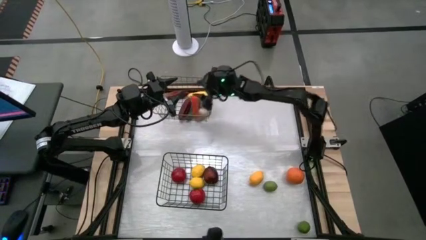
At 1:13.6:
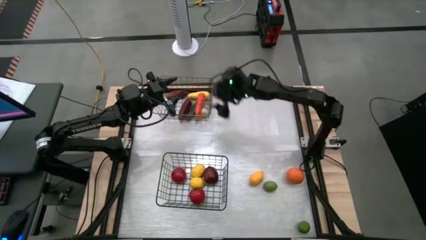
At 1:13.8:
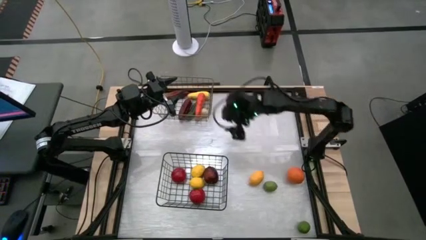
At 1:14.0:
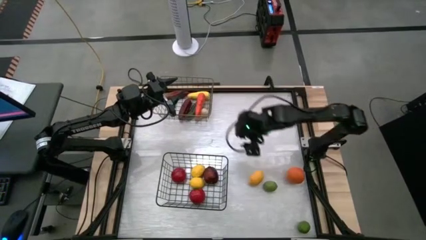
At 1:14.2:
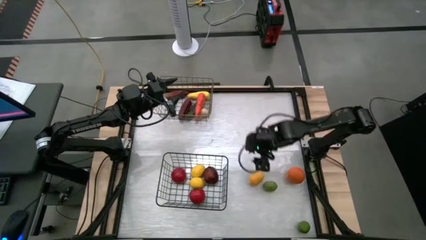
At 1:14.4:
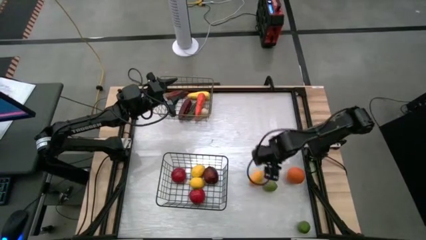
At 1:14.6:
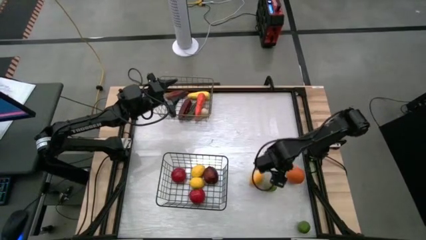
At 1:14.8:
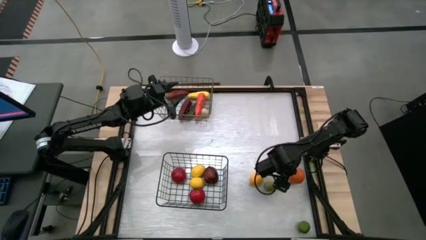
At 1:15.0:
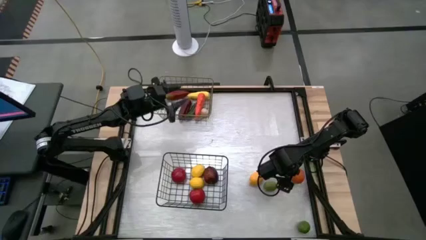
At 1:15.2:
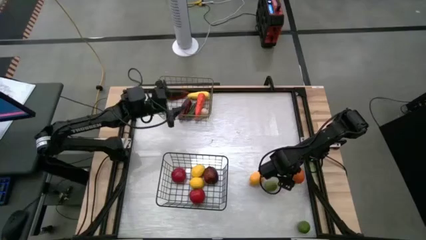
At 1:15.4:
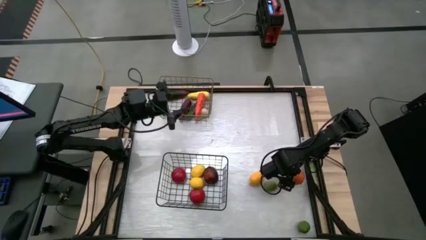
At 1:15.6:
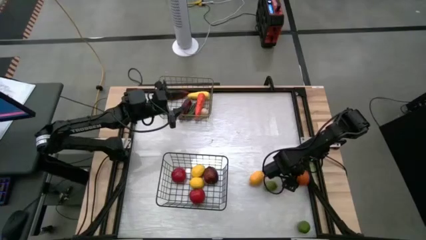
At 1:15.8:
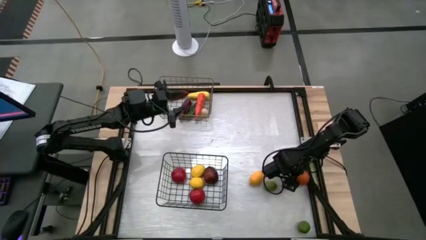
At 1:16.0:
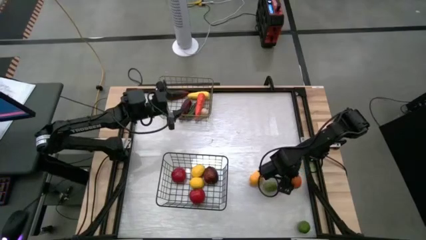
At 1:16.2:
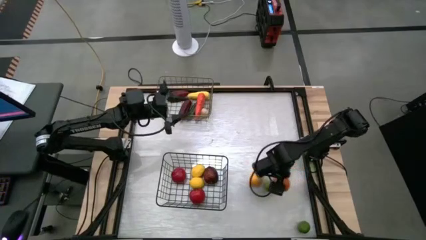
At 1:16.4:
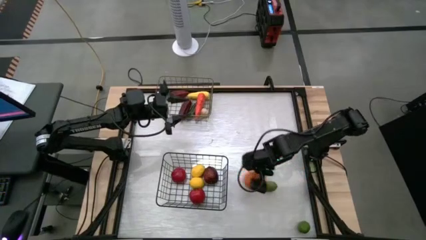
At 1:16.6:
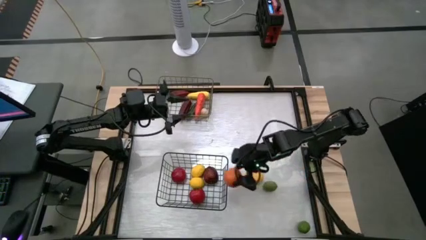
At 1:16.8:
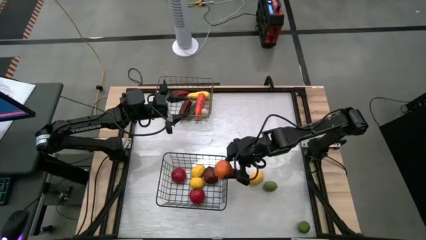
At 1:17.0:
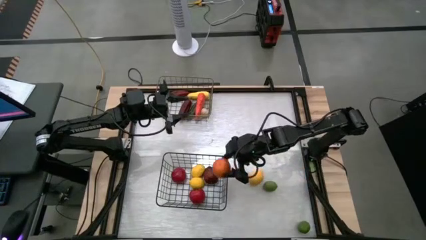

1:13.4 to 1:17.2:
Task: Sort produce into baskets
Put the light red orange into the bottom wire basket

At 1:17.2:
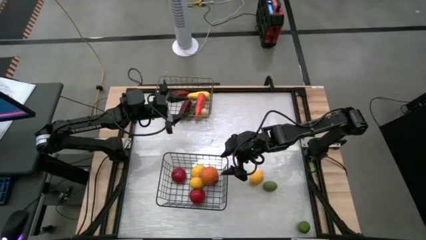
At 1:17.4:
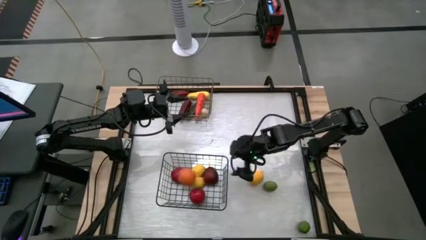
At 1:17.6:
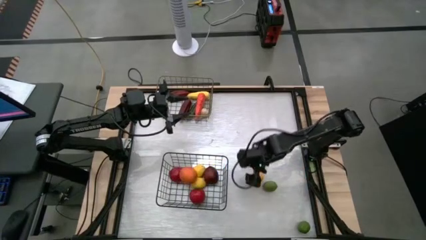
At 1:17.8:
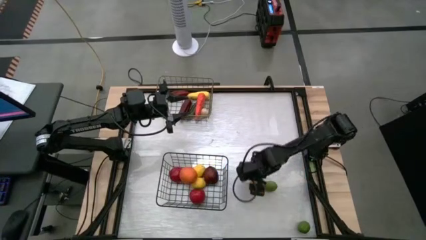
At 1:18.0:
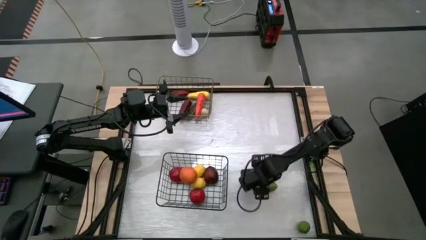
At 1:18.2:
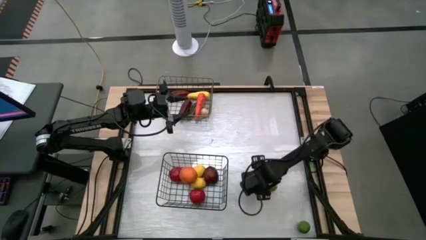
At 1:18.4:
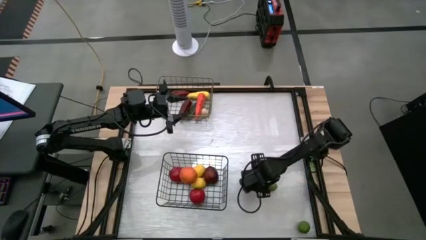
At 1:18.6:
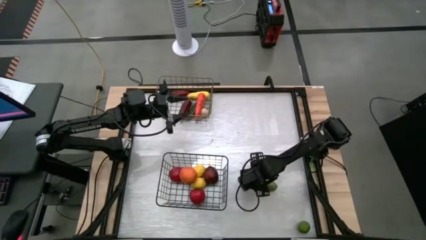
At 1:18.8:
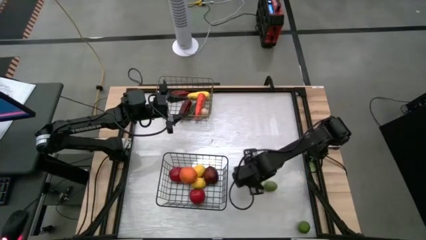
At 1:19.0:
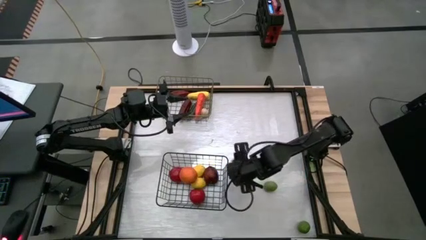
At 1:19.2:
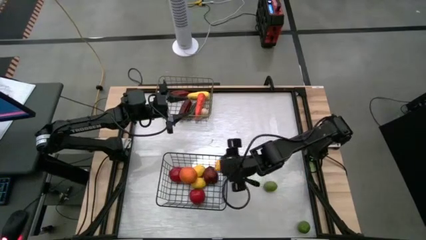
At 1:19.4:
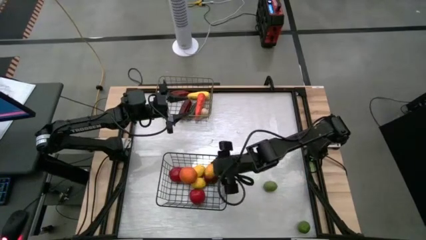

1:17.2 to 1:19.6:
Put the yellow lime into the bottom wire basket

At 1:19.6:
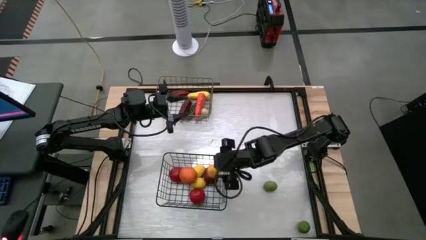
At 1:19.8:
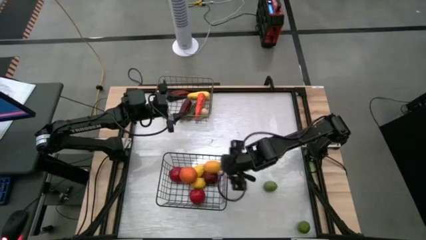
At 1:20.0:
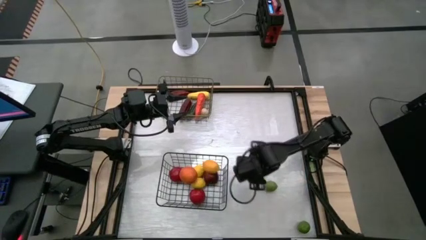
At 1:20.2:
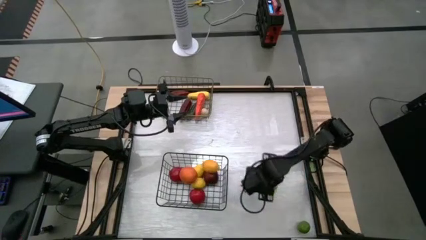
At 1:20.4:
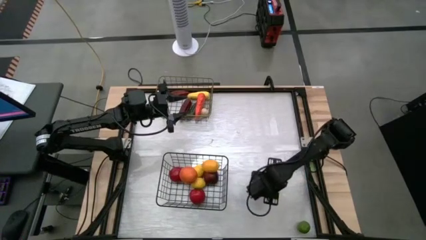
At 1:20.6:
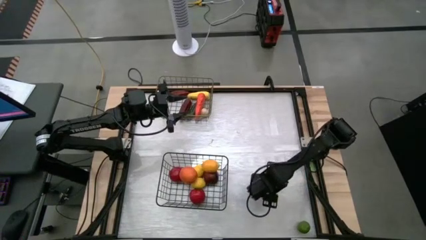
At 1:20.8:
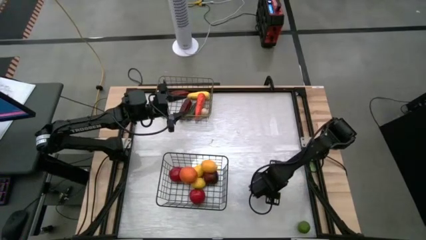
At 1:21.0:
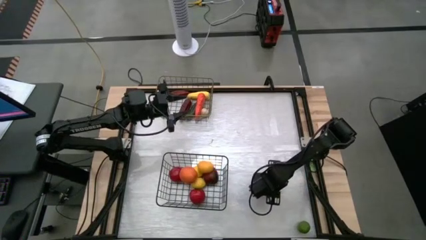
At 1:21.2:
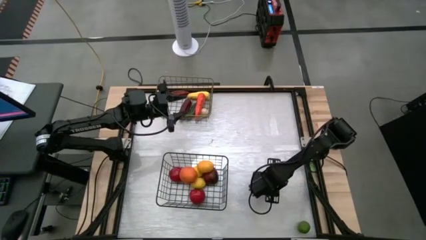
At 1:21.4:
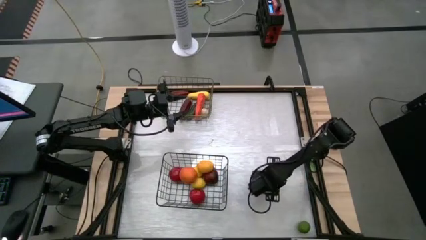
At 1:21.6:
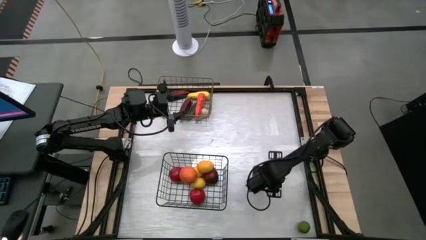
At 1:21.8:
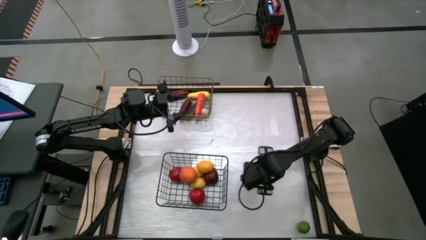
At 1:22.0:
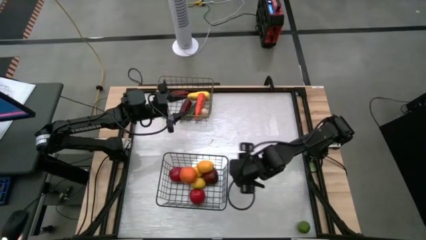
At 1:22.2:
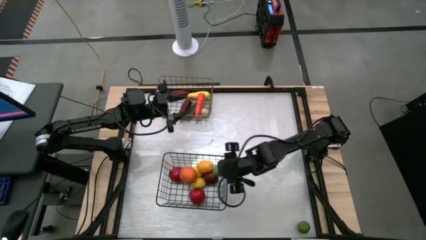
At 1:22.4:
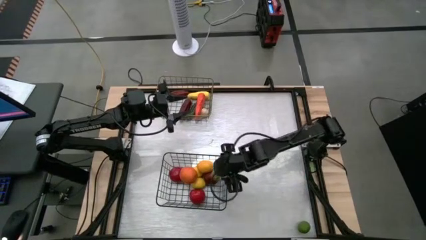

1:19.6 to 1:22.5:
Put the green lemon into the bottom wire basket

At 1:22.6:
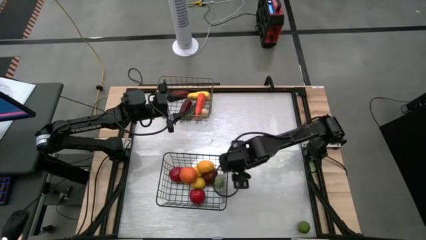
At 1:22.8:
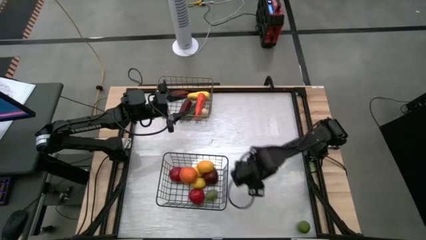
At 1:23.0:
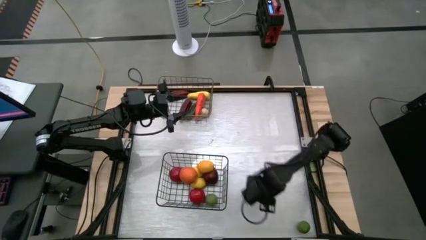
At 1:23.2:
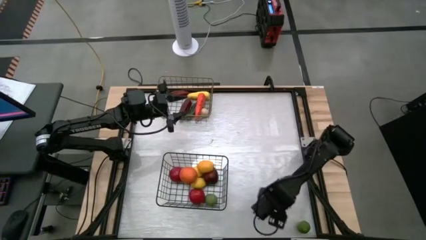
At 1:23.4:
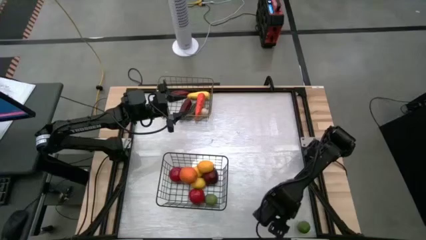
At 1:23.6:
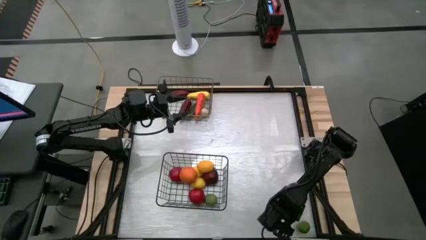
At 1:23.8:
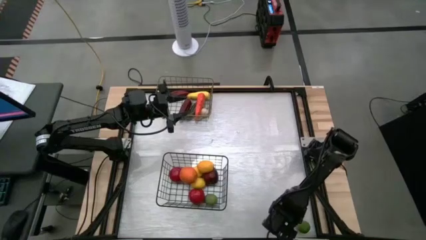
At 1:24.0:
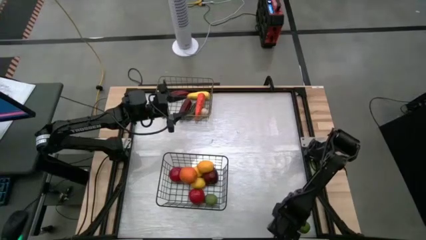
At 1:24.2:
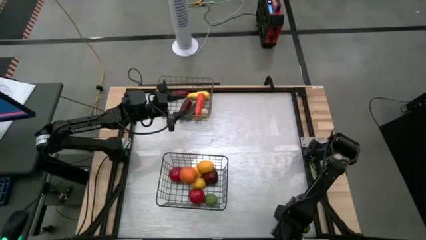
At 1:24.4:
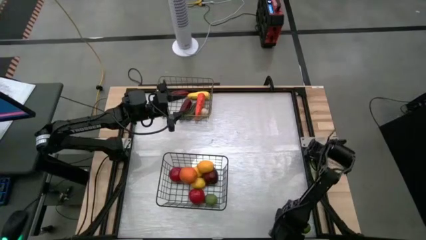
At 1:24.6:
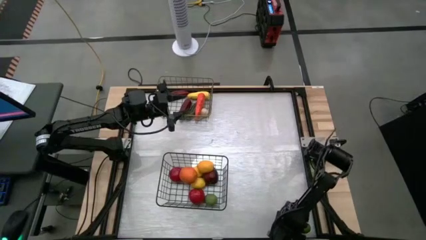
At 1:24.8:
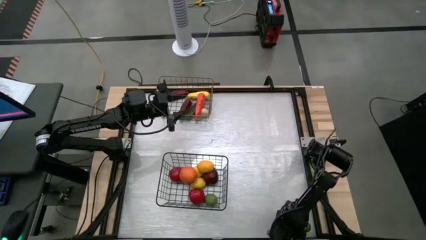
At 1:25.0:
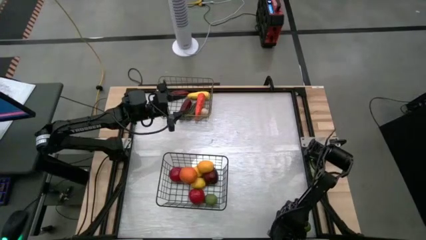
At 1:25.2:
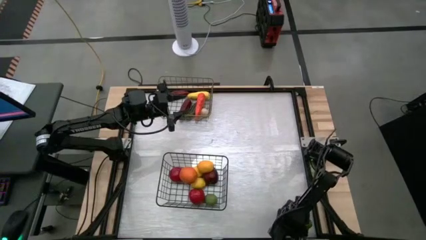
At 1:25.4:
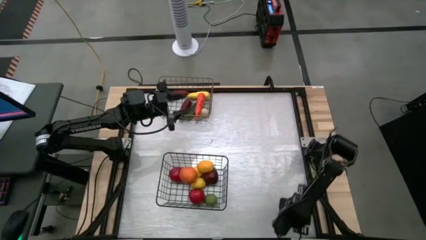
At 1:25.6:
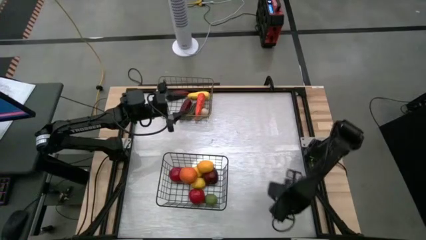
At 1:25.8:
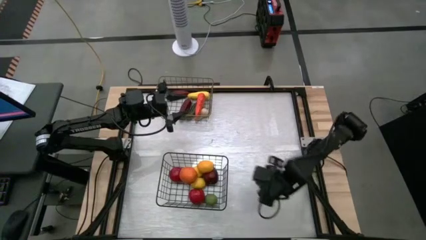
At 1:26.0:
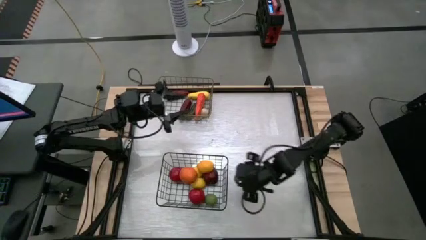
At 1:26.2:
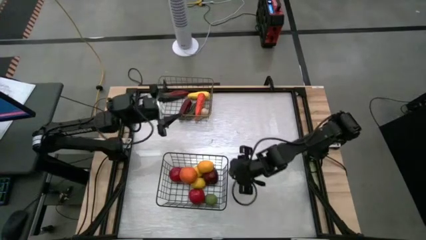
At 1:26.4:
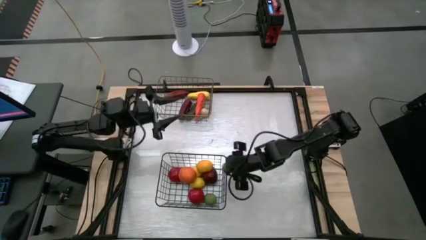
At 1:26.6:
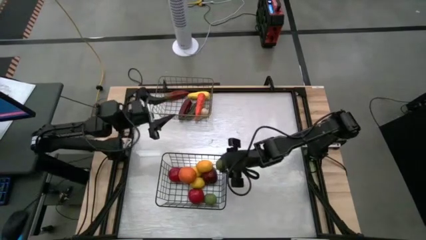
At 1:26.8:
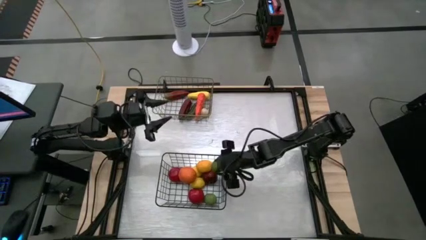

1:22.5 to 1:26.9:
Put the green lemon into the bottom wire basket

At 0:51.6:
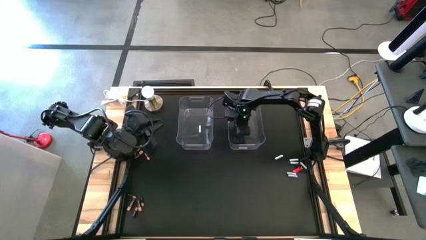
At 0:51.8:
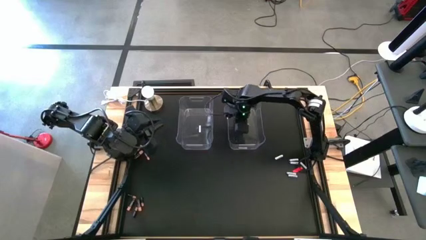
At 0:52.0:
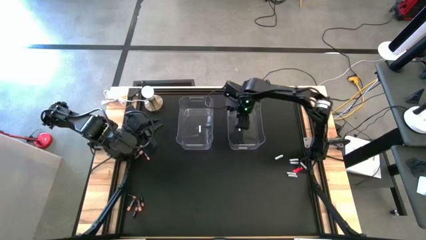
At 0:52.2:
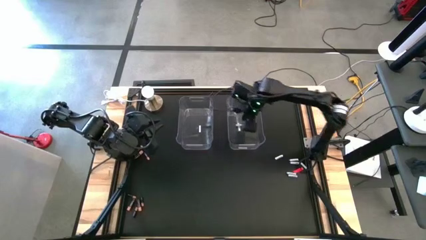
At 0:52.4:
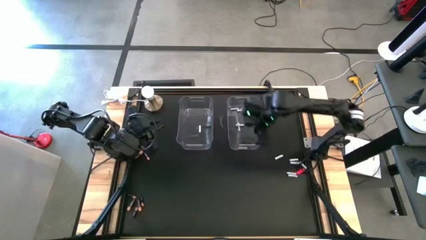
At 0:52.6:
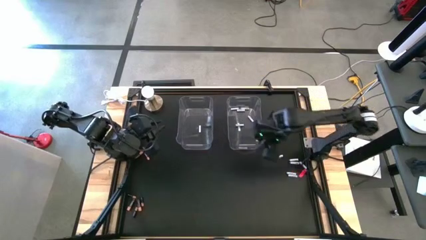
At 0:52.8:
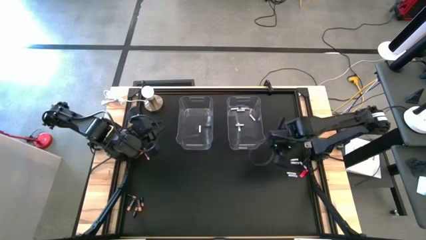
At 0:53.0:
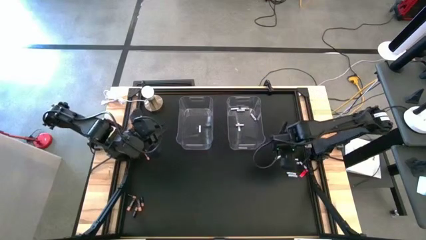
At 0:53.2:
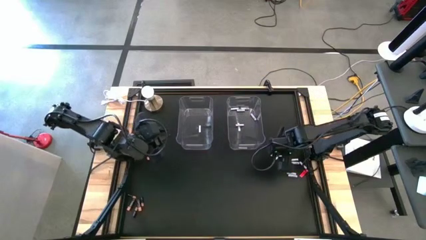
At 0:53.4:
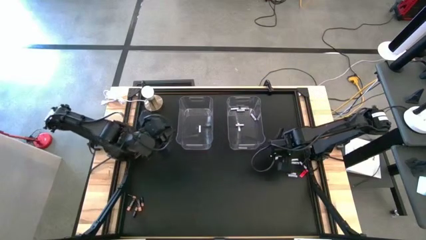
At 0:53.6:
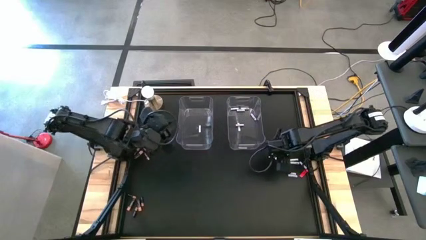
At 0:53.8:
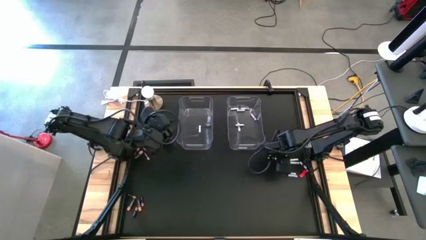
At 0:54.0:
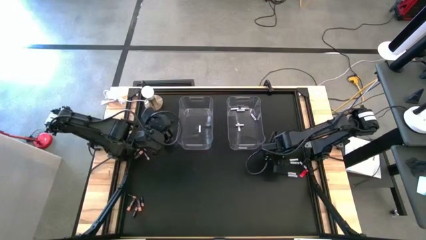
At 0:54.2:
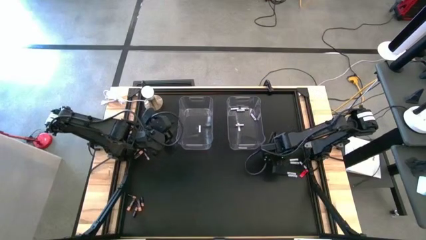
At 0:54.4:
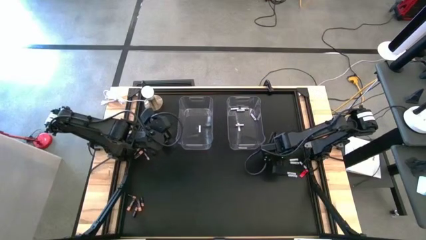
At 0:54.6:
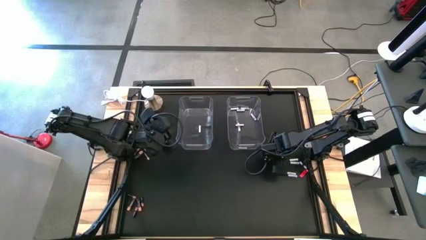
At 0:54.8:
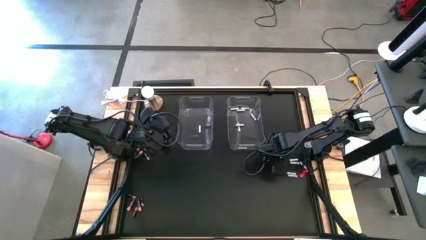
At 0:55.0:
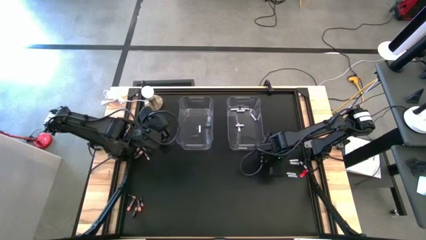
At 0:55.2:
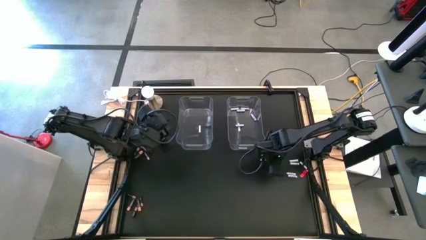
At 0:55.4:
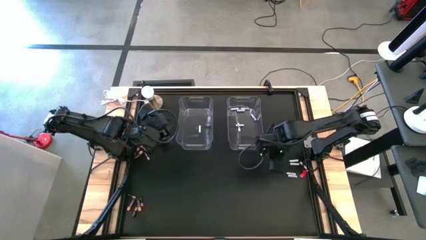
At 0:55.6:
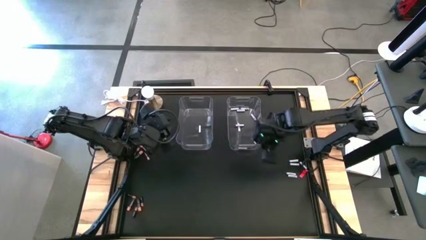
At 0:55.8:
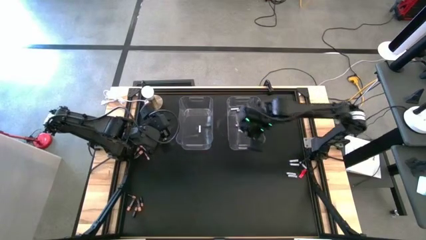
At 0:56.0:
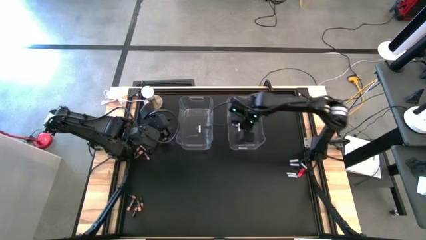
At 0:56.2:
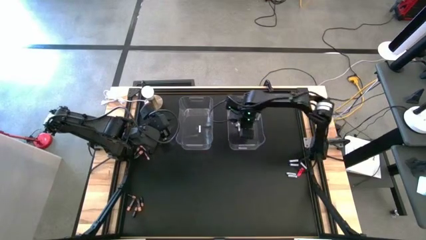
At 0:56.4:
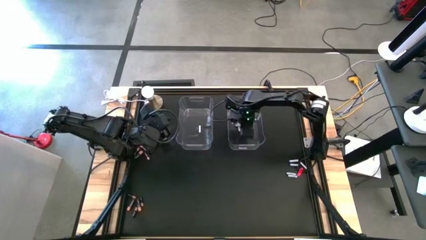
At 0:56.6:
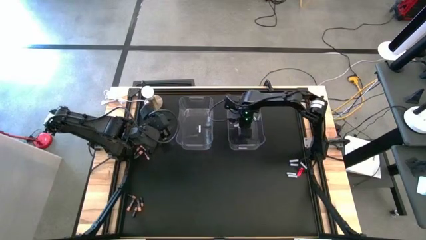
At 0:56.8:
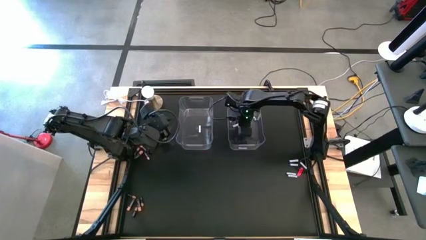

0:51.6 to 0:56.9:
Task: Sort batteries
Put the white battery into the right transparent bin
